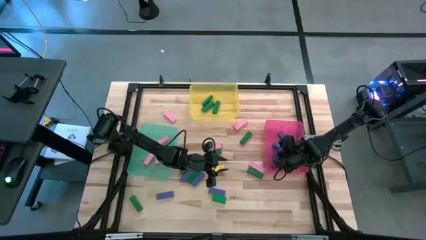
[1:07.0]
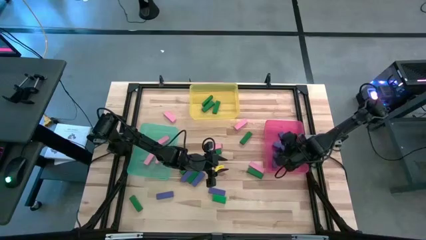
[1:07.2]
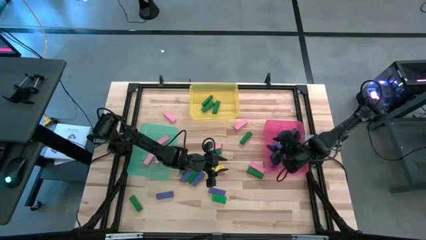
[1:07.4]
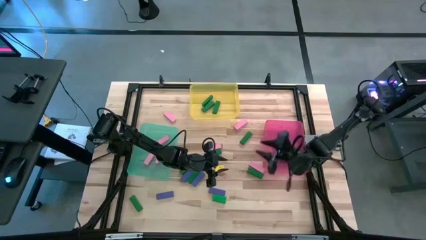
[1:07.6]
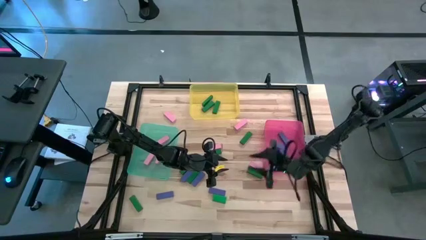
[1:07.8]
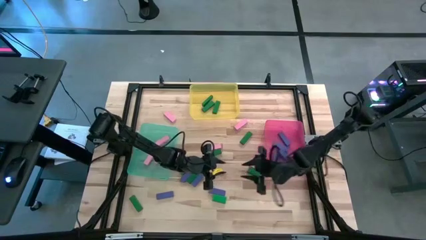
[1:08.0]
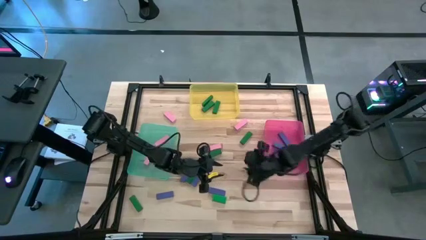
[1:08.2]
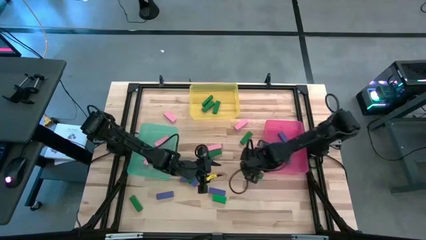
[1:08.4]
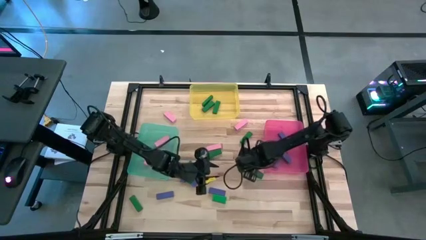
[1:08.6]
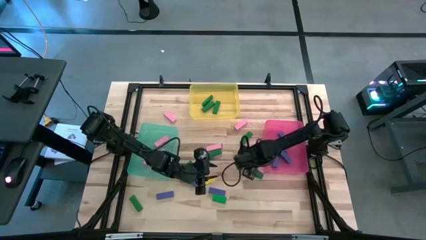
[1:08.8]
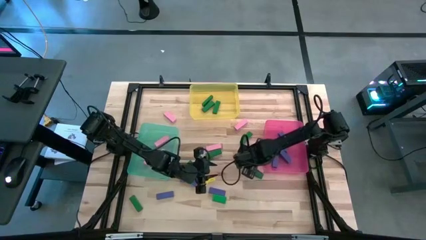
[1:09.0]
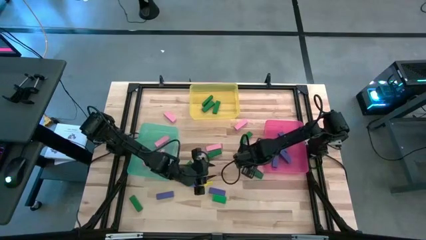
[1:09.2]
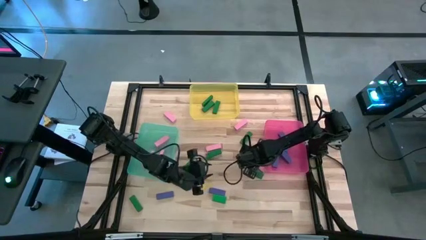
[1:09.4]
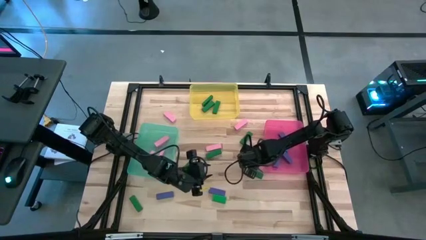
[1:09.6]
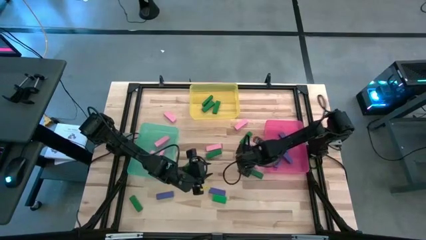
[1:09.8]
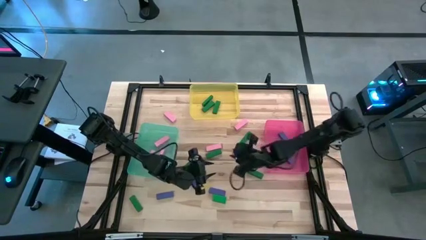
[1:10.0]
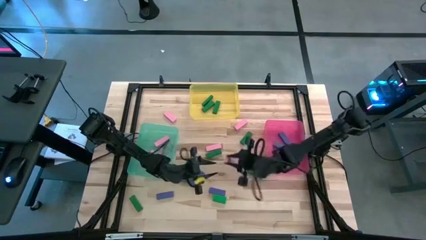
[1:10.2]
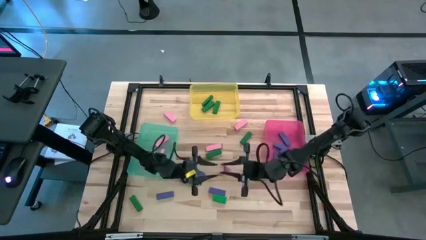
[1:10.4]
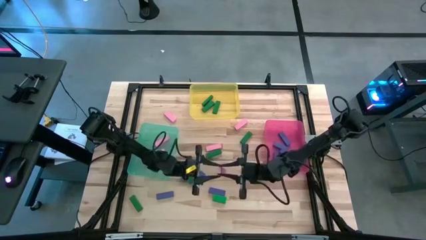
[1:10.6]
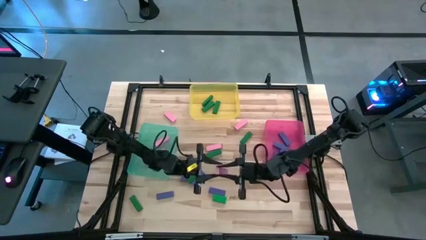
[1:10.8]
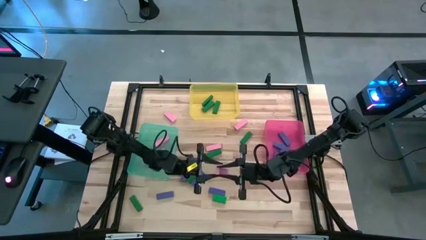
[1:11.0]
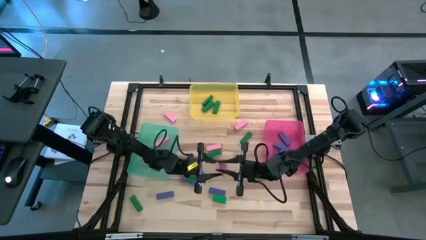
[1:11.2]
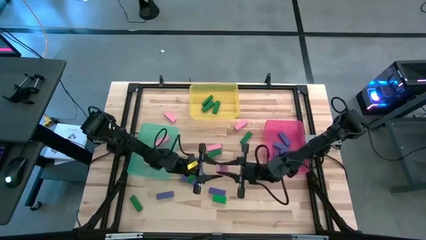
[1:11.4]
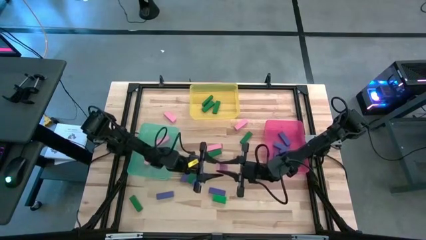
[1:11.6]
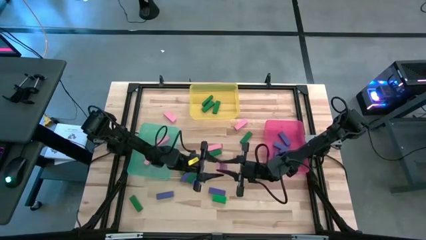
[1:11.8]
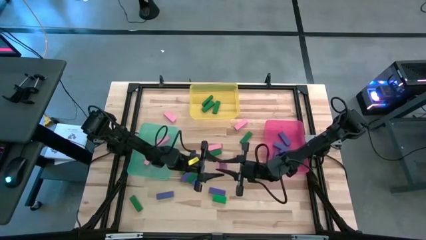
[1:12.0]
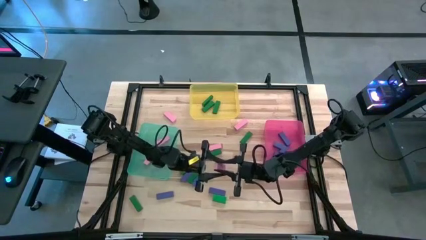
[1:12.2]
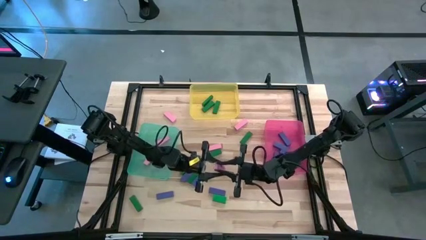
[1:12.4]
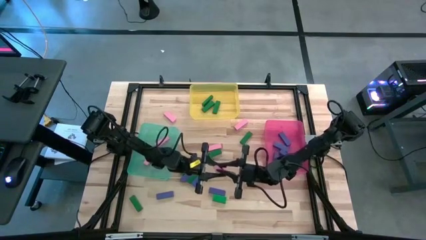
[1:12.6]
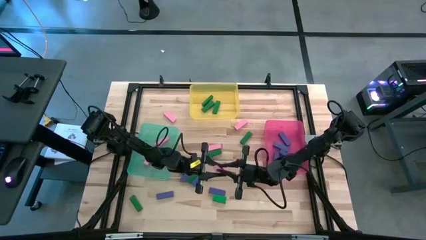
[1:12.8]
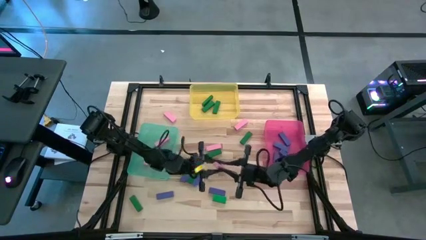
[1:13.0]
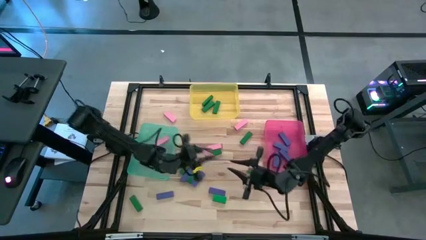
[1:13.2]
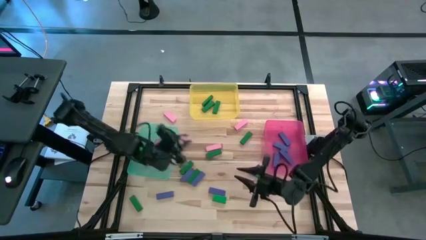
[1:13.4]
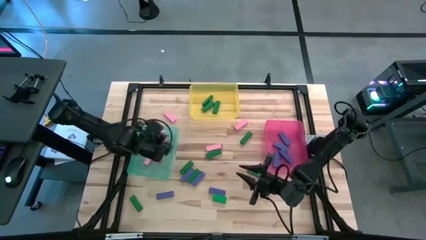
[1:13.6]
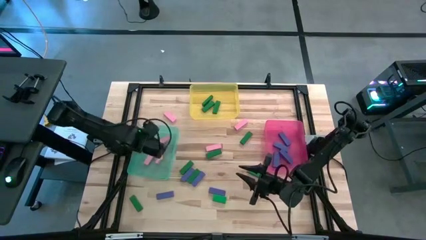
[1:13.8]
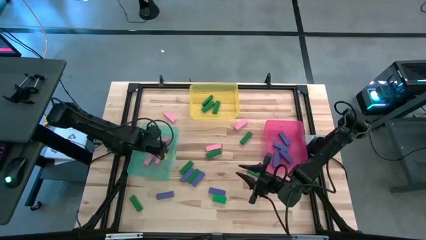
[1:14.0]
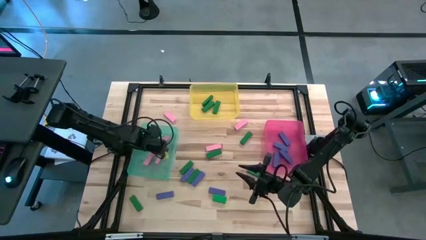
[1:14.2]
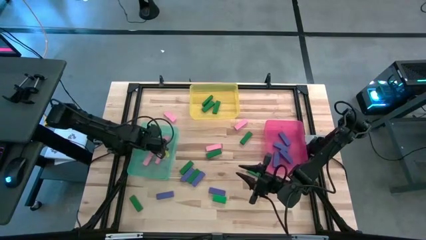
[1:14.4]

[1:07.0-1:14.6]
Task: Sort blocks
Put the pink block into the blue bin

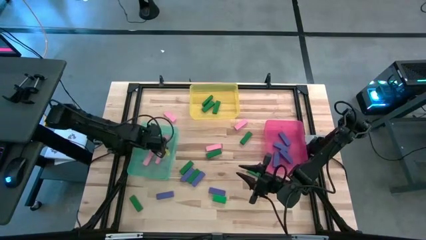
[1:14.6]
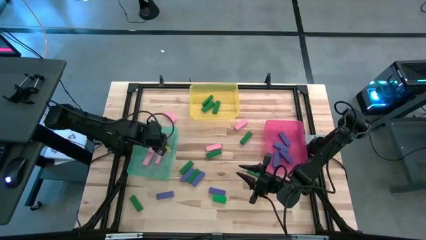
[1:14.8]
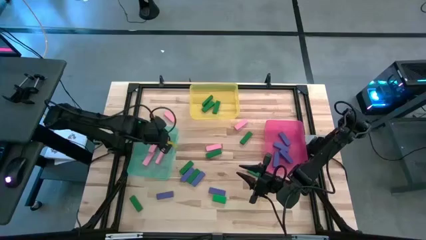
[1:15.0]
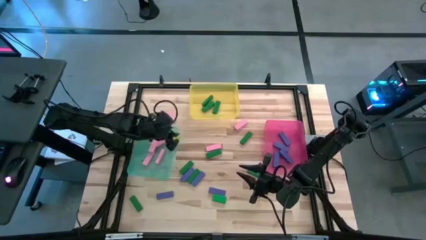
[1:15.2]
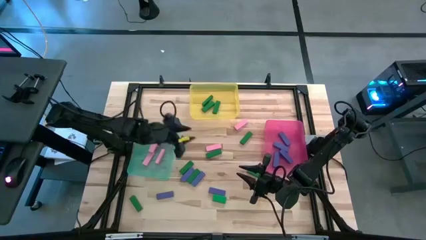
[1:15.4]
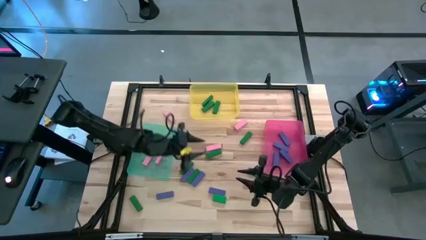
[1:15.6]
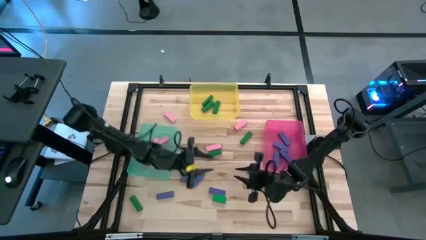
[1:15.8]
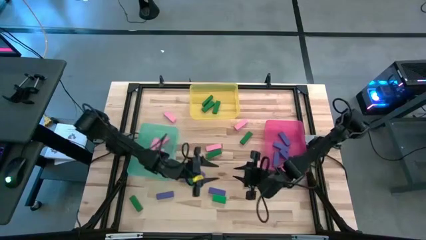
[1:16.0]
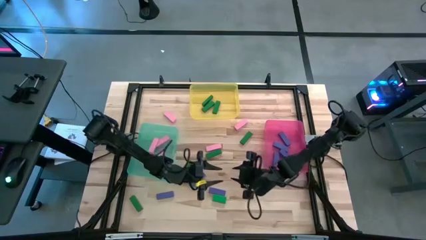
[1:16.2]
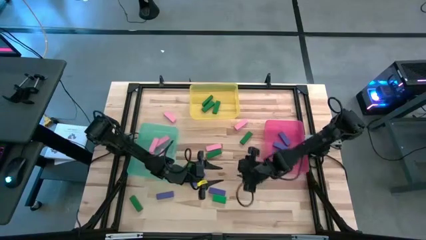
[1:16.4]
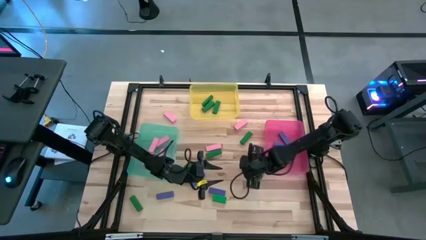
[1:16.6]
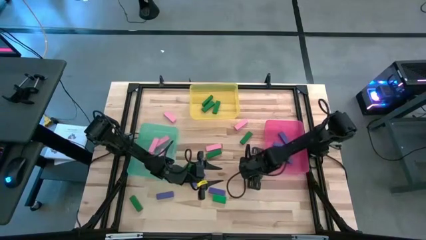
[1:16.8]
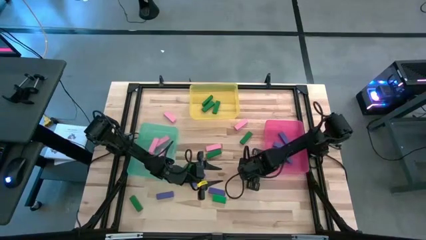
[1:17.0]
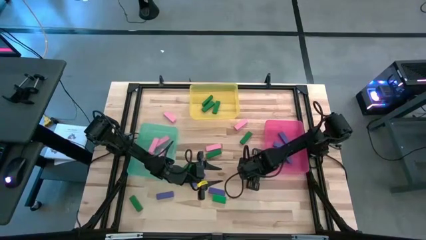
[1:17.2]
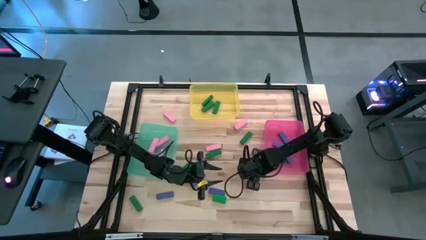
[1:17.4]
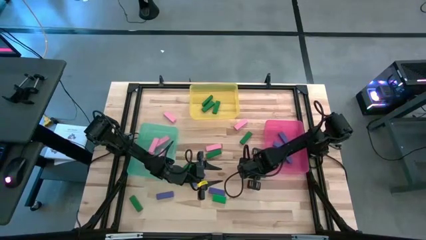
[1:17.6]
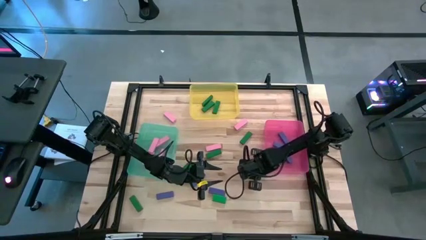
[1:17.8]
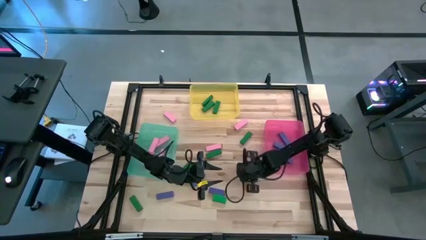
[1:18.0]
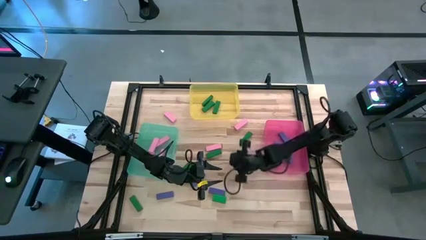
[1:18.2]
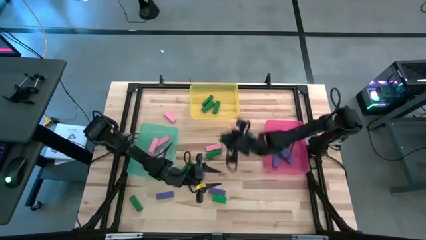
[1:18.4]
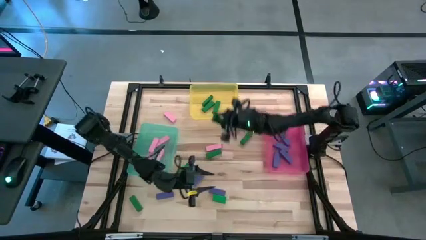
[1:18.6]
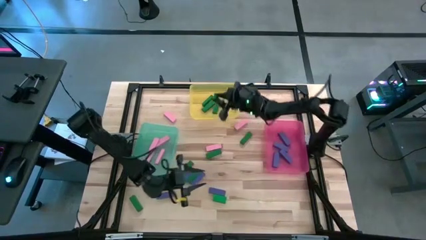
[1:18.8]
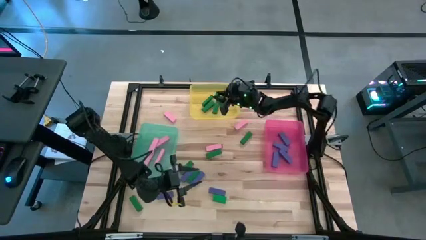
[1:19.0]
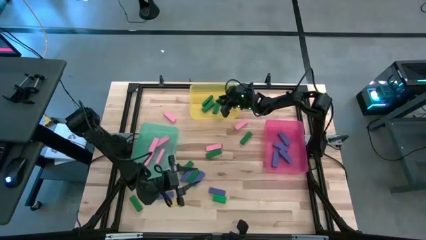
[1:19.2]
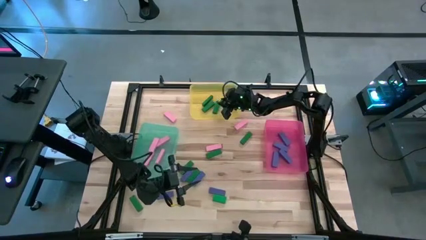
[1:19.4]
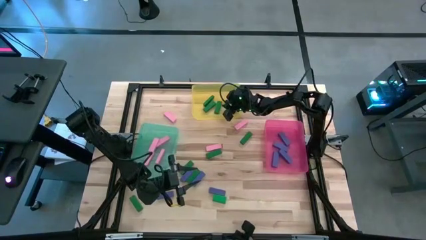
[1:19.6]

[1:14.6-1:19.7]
Put the green block into the yellow bin

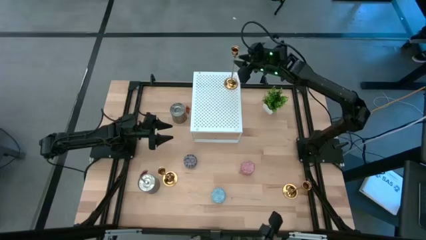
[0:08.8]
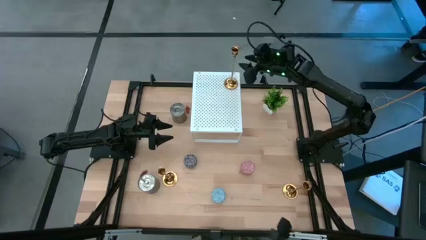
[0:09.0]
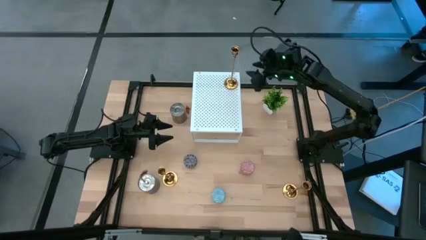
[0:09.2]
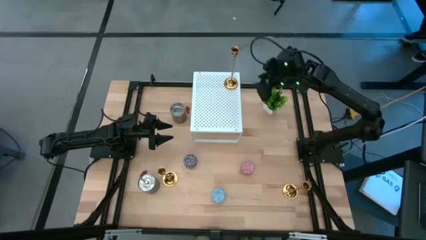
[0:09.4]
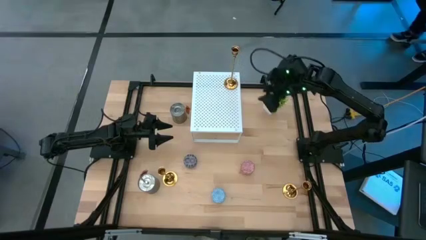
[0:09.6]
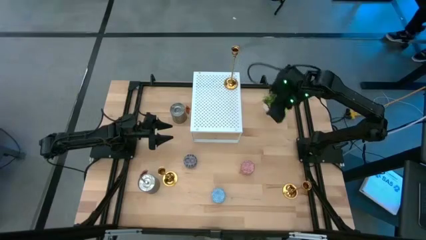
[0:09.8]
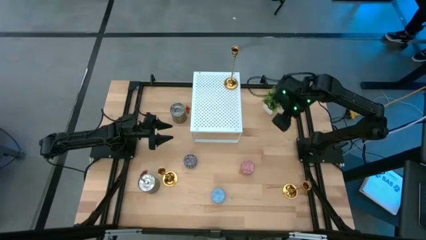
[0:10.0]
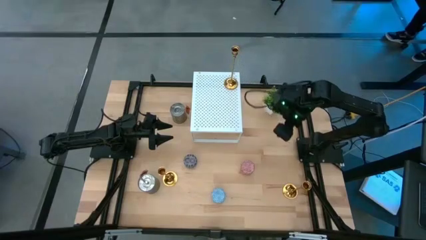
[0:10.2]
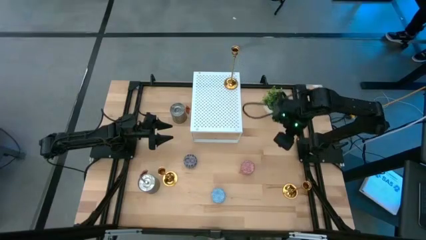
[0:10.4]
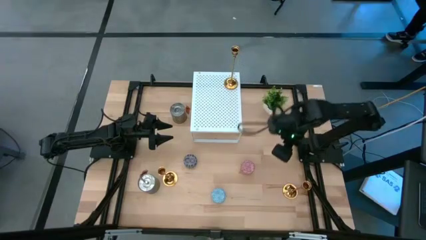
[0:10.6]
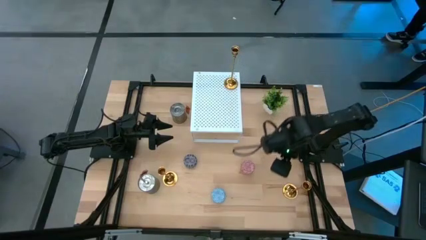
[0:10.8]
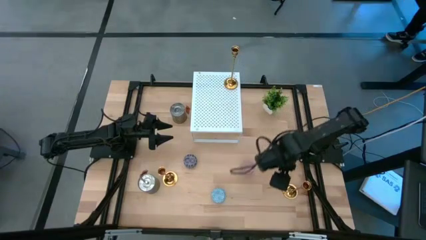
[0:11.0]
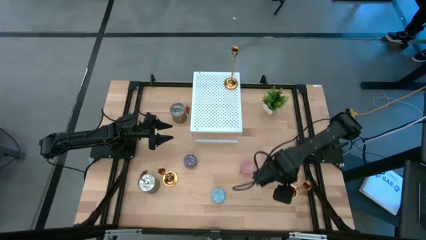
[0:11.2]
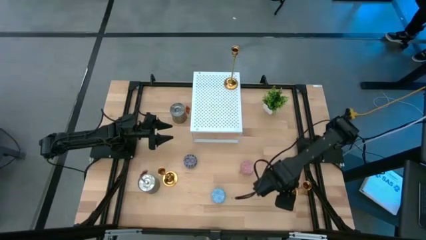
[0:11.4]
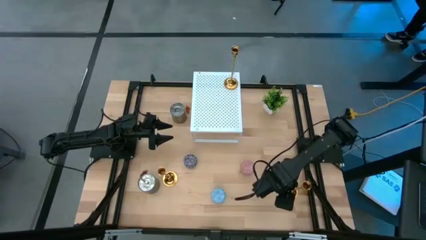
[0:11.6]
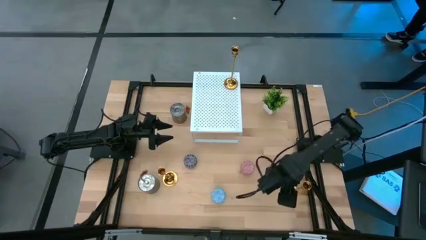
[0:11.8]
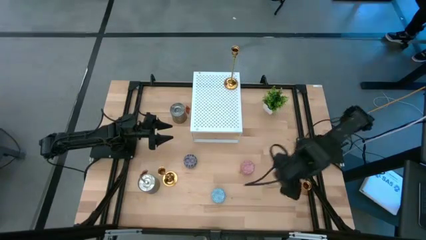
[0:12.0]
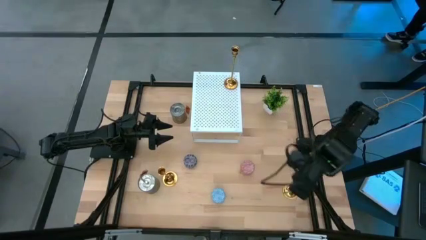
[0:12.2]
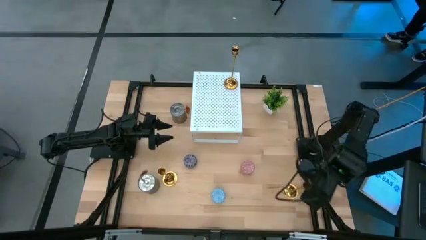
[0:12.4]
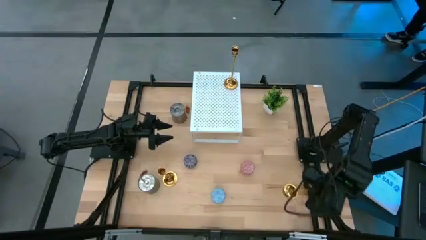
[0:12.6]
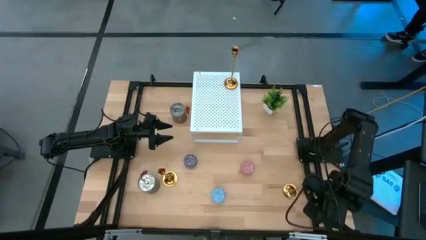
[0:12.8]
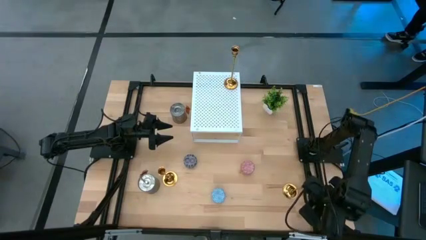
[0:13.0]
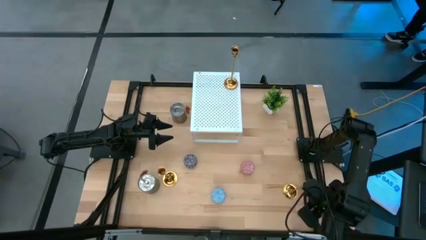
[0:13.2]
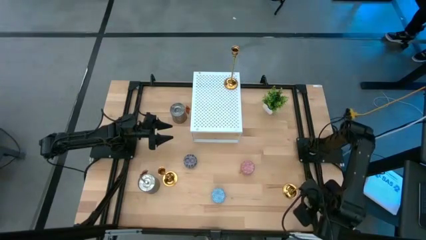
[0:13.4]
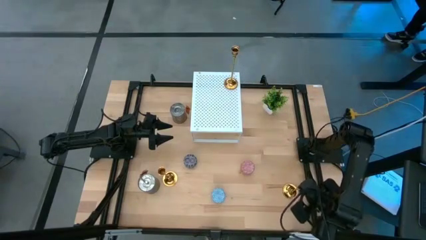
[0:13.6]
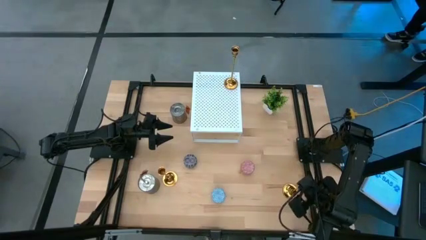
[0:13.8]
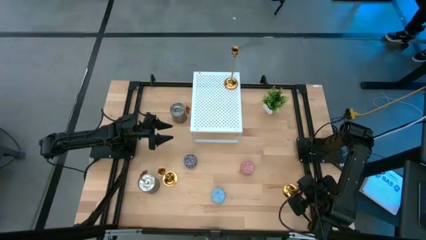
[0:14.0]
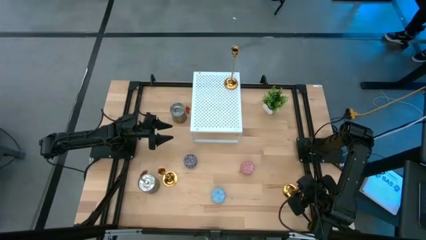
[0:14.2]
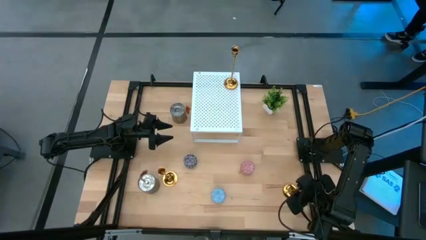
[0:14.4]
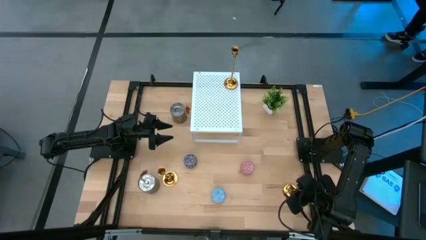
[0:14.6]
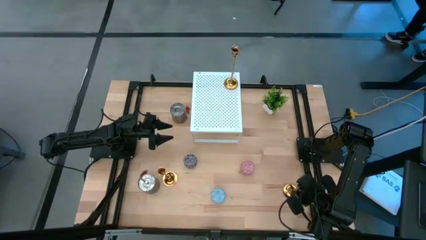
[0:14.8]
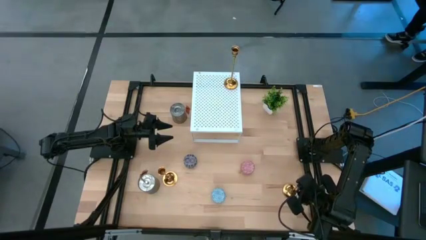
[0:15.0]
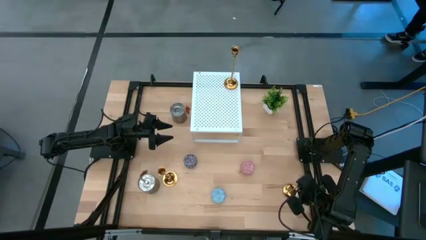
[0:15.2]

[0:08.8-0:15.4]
Task: Pick & Place candle stick holders
Put the right gold candle holder on the shelf
